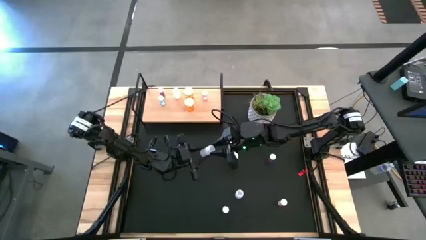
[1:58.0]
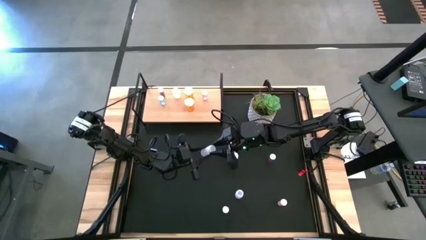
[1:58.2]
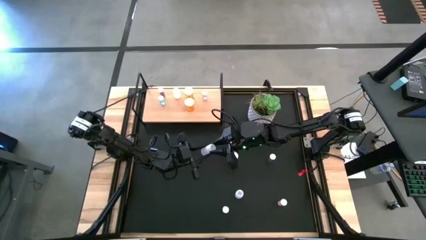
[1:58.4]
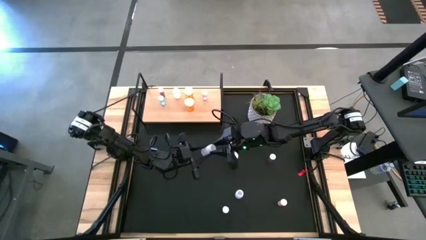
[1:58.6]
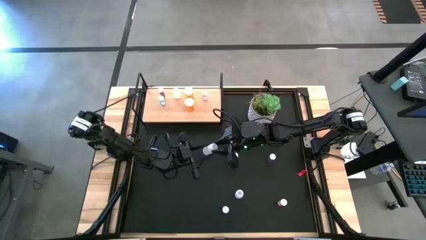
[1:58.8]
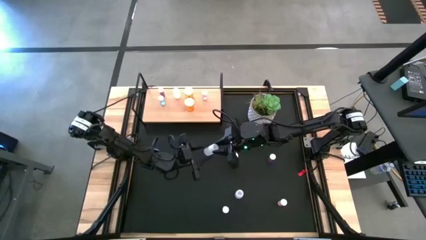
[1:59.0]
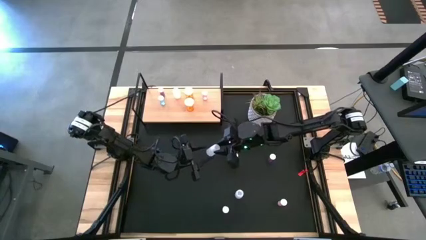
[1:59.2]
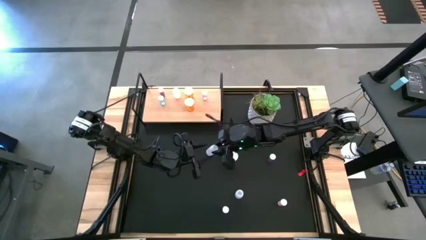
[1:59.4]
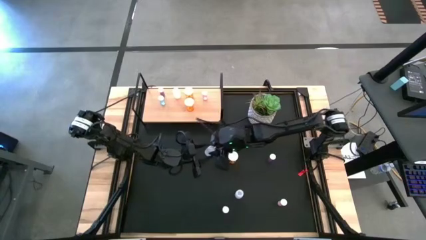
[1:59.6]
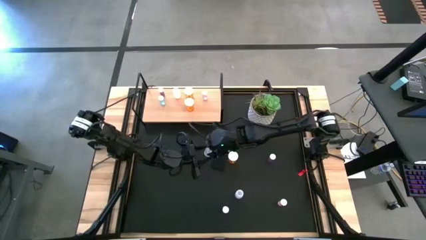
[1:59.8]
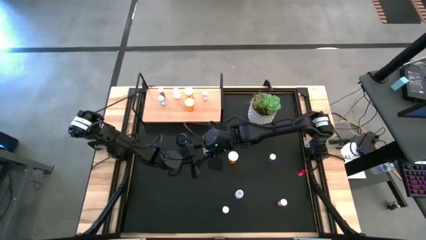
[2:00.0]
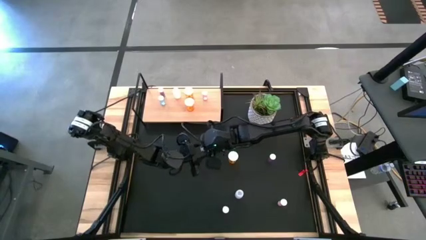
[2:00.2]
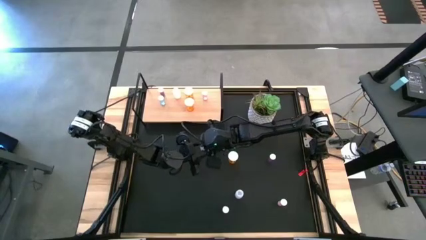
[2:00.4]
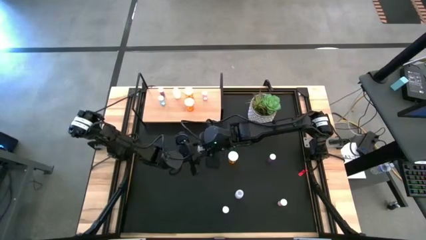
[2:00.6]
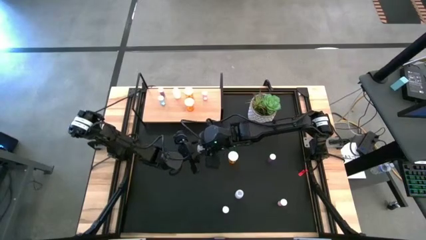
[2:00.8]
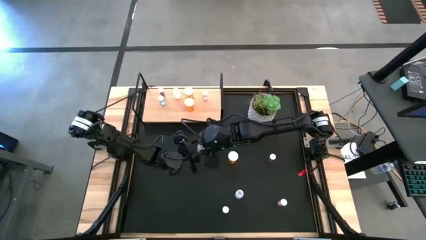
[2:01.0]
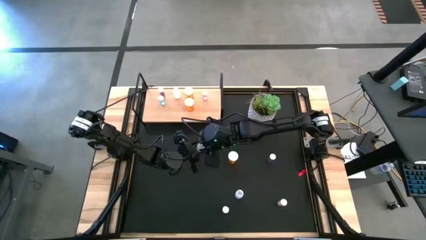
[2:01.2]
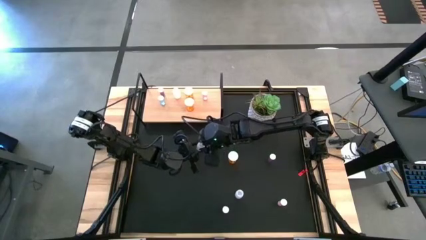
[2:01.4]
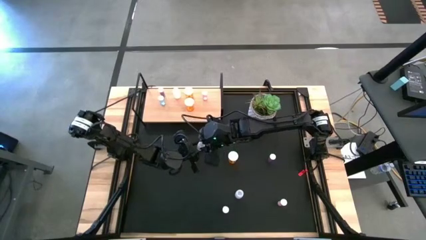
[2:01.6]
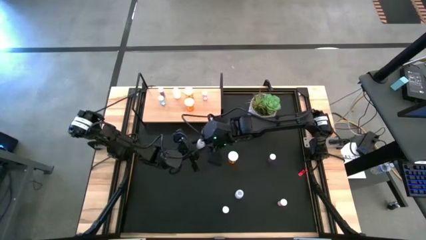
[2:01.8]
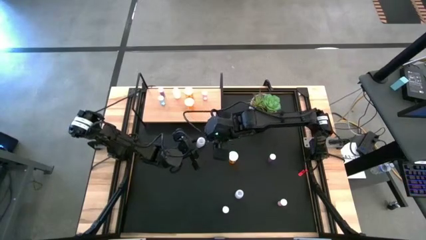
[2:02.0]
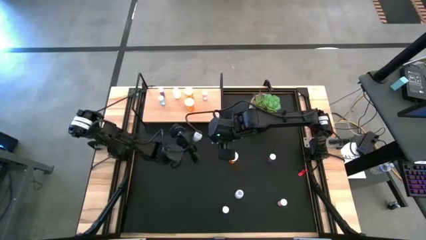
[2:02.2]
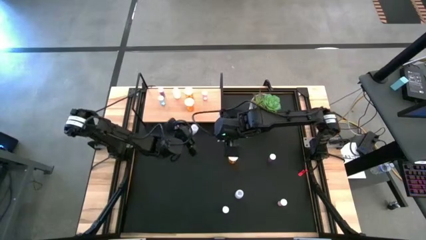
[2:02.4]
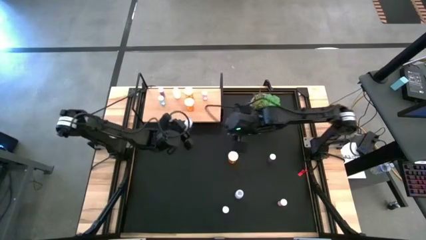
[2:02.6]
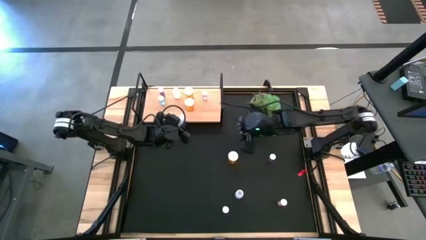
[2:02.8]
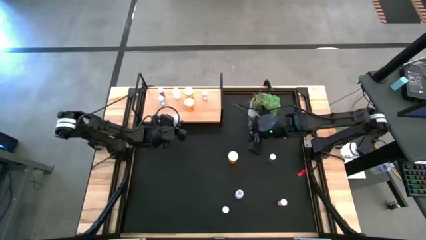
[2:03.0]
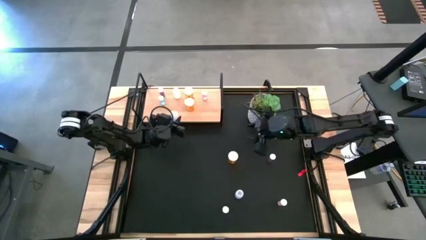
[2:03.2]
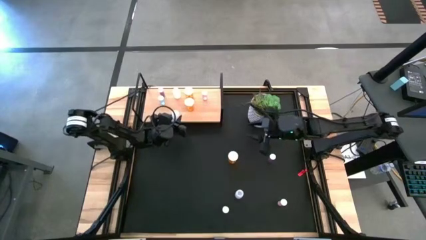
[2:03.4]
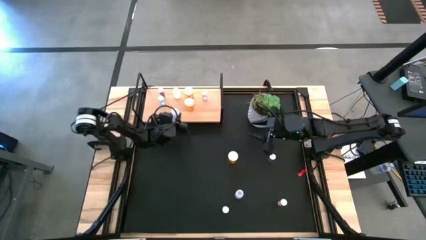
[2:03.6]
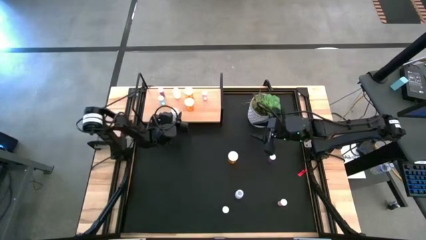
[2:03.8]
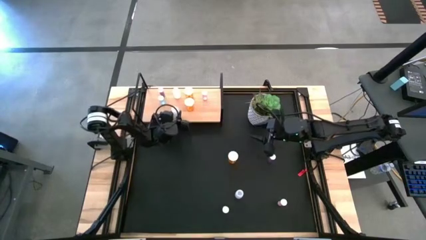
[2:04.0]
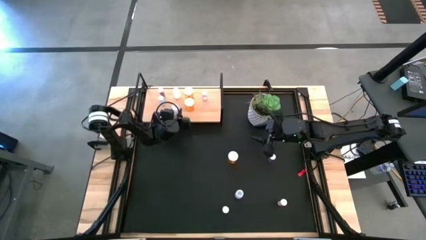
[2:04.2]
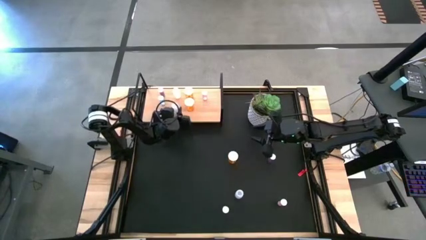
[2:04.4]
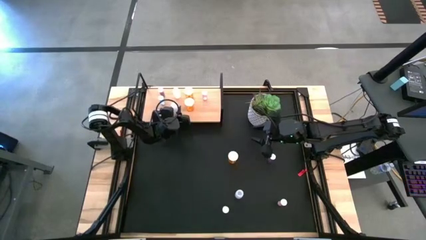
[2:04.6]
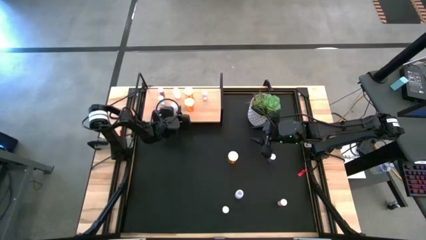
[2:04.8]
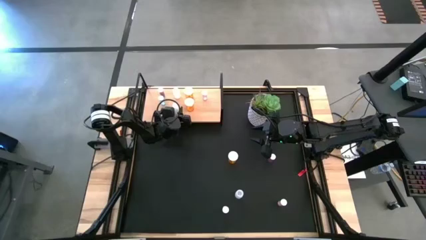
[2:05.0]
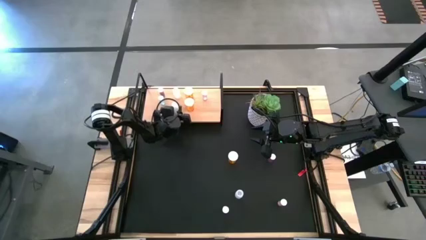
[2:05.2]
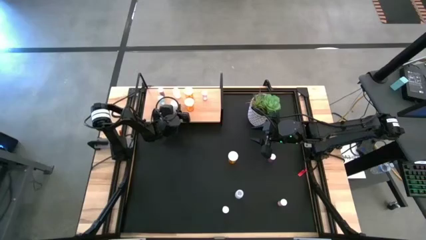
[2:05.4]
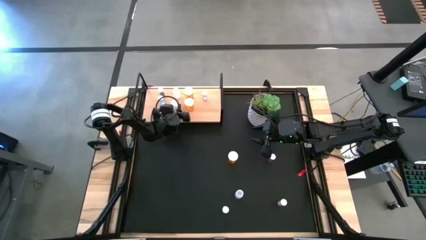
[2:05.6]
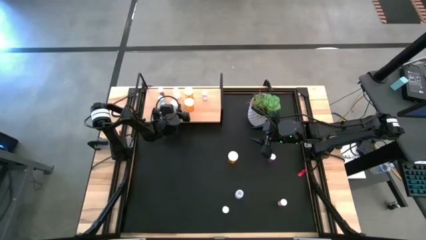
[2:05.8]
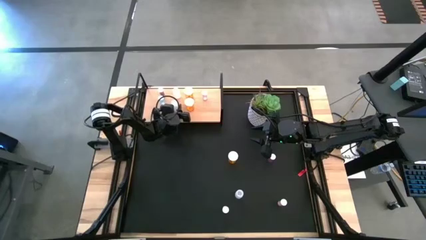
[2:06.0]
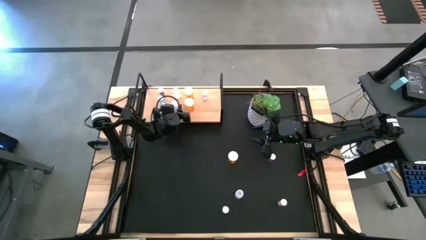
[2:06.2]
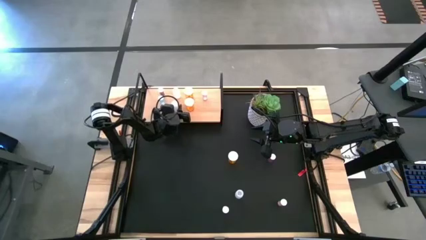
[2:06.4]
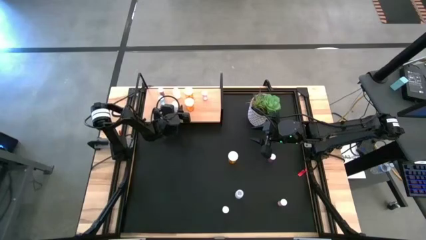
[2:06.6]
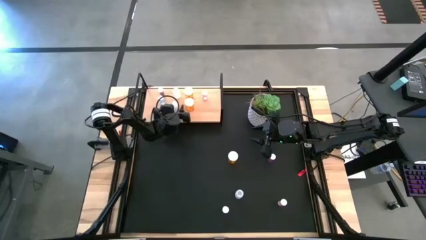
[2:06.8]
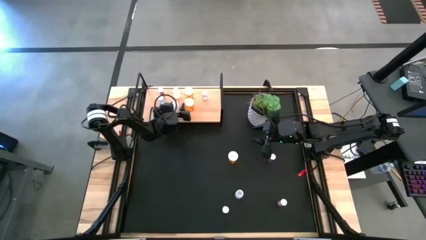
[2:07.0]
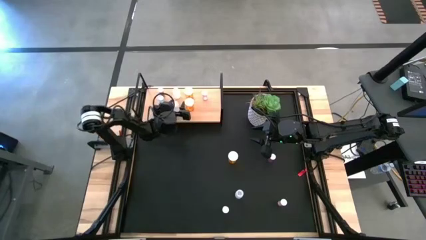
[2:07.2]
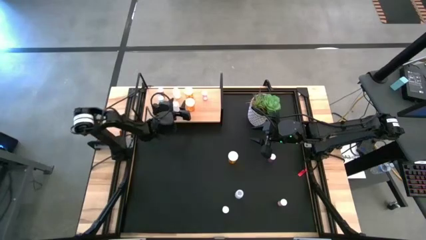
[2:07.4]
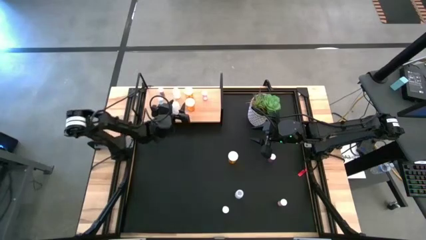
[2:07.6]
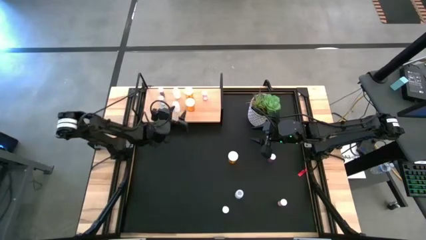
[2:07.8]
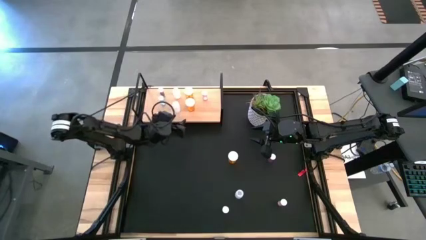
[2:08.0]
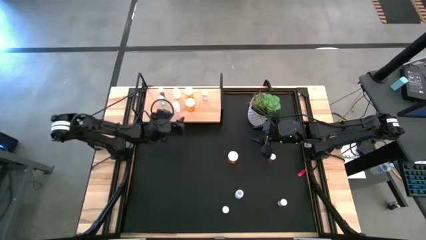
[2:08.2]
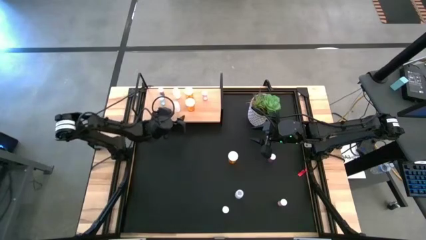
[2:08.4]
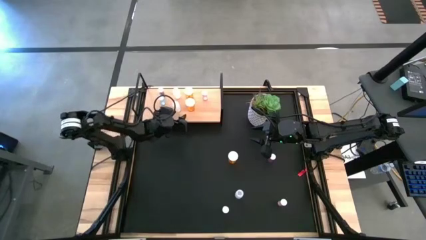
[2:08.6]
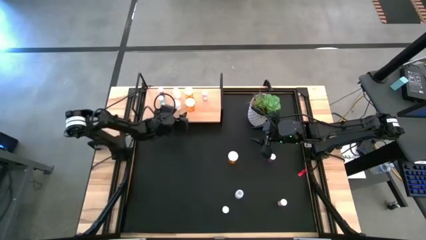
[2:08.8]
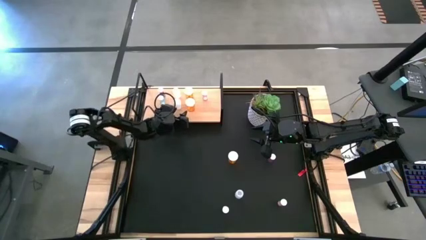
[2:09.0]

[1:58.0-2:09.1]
Task: Pick and place medicine bottles onto shelf by color
Put the bottom left white pill bottle on the shelf aligned with the other white pill bottle
